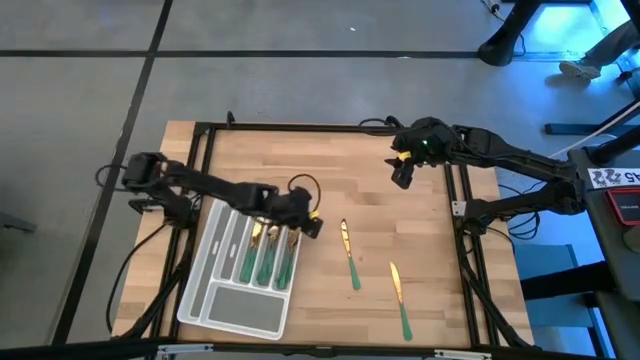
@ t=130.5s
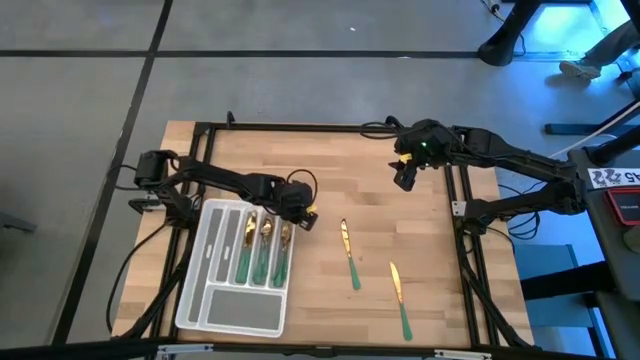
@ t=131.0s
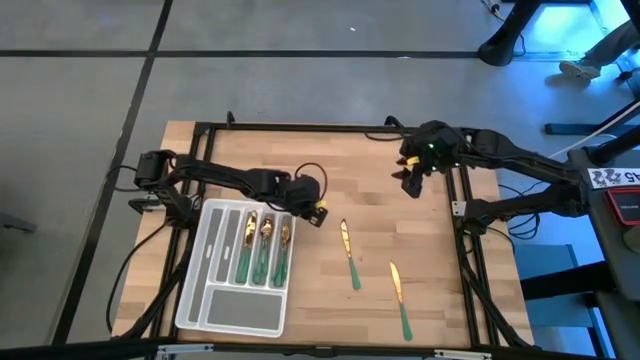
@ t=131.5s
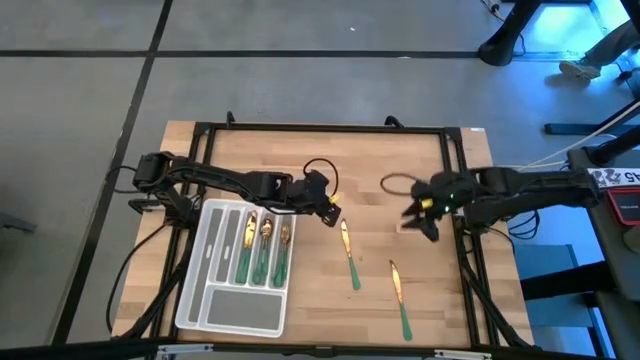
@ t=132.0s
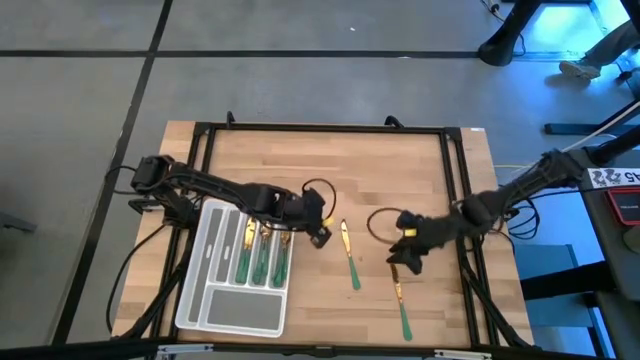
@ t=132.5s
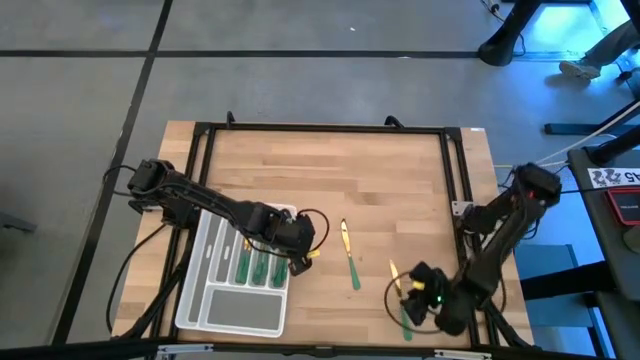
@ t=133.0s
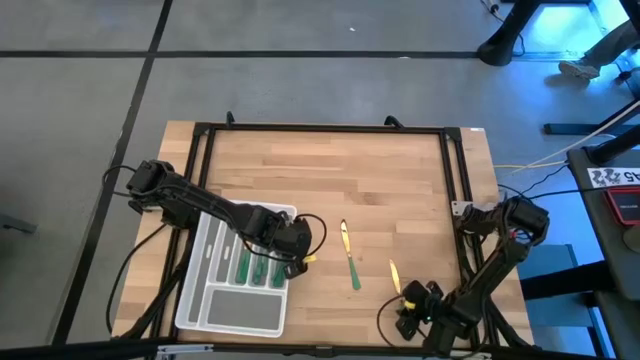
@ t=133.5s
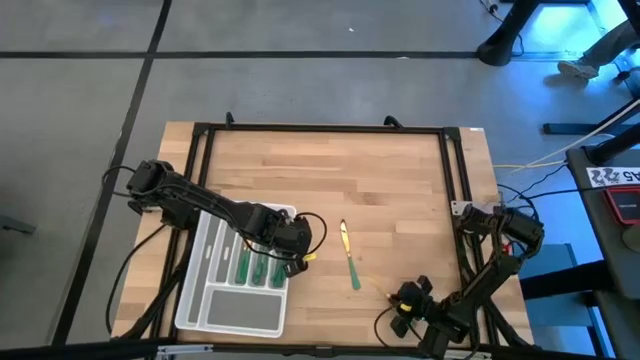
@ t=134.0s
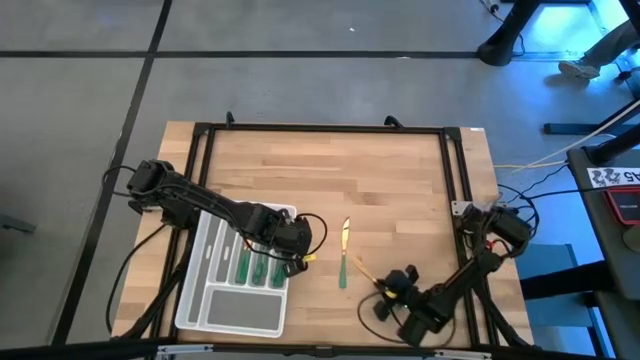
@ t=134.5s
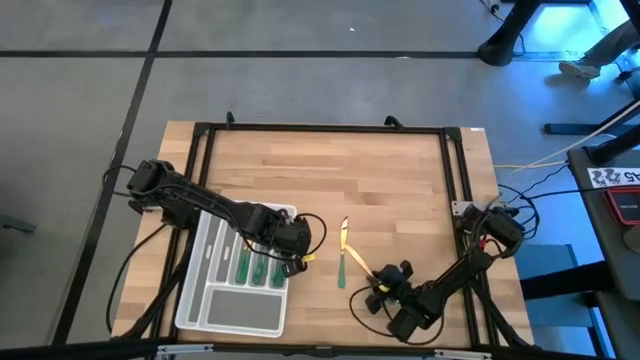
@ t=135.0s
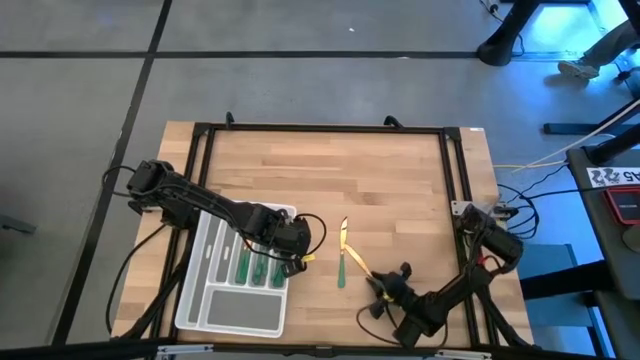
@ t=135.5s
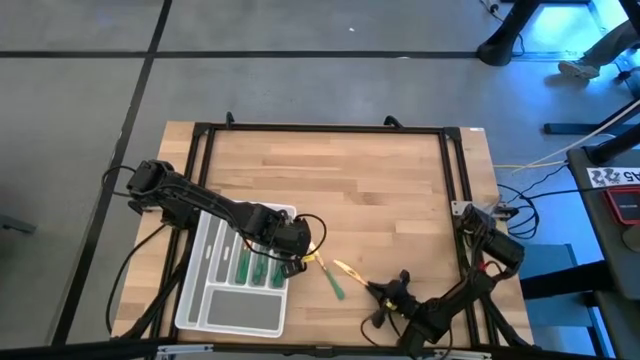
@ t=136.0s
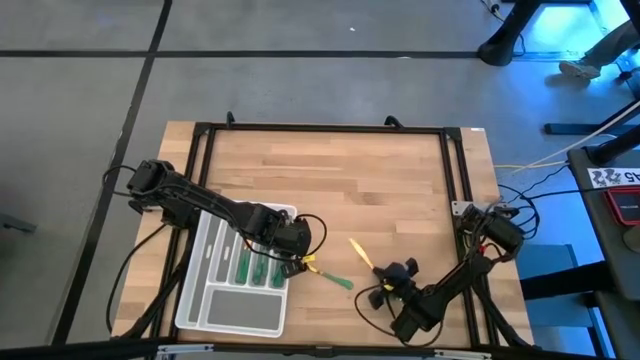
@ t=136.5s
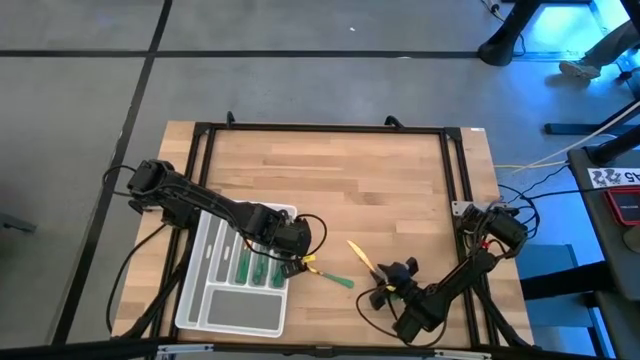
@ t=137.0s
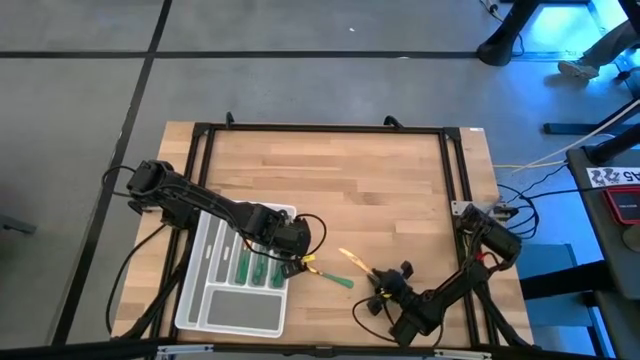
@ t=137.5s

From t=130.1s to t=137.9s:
Task: Sort silverware
Put the knife into the silverware tray

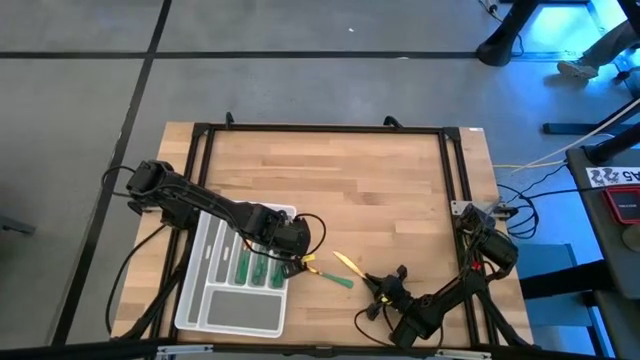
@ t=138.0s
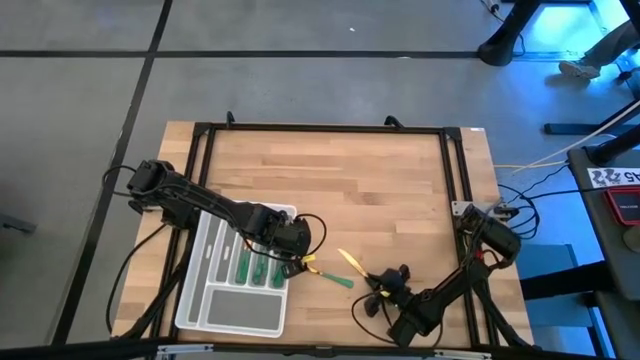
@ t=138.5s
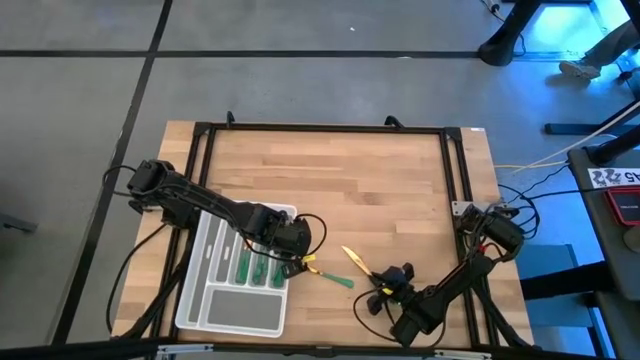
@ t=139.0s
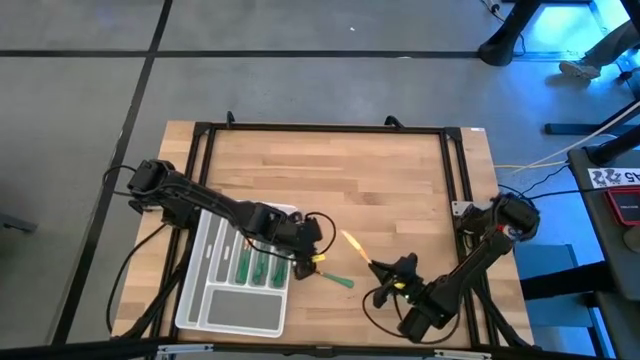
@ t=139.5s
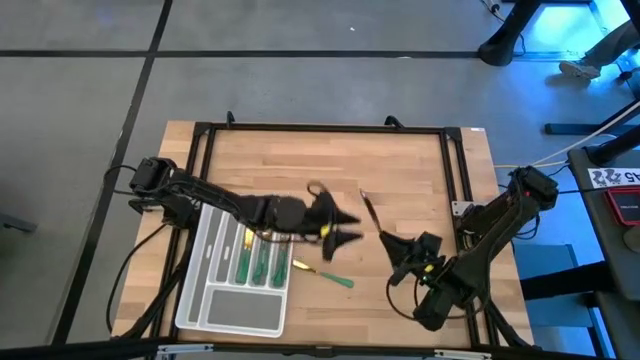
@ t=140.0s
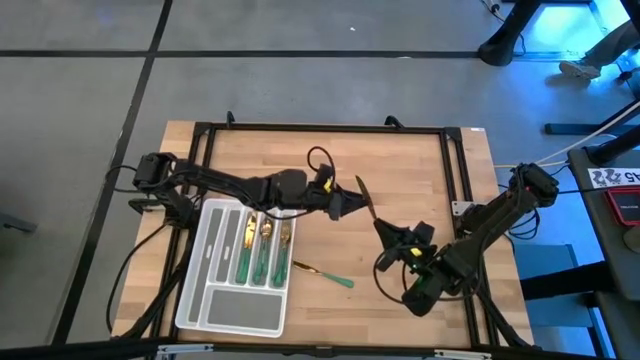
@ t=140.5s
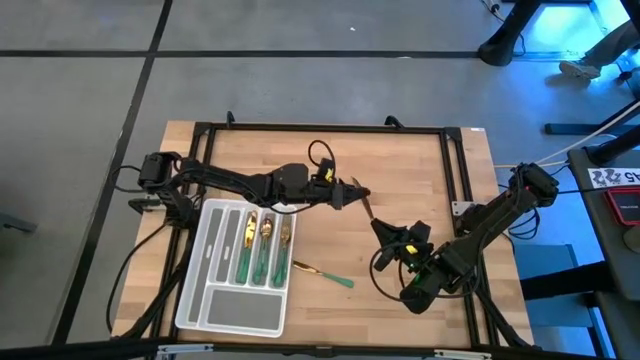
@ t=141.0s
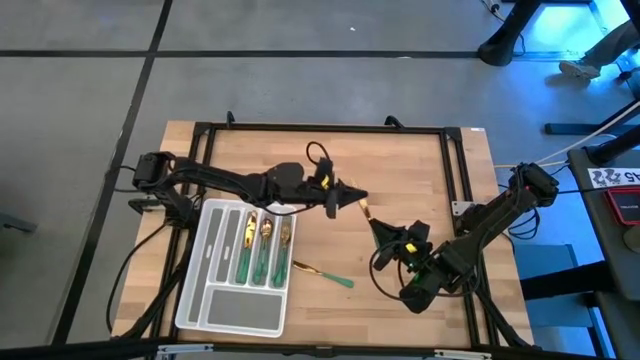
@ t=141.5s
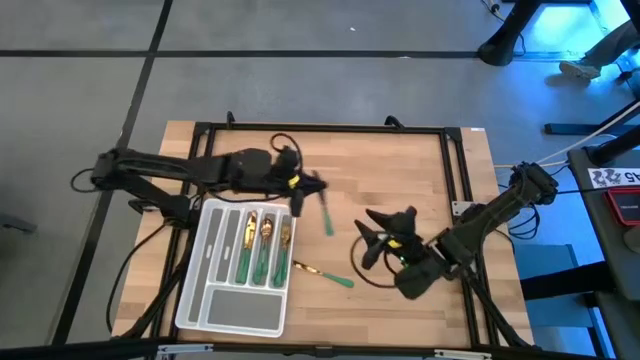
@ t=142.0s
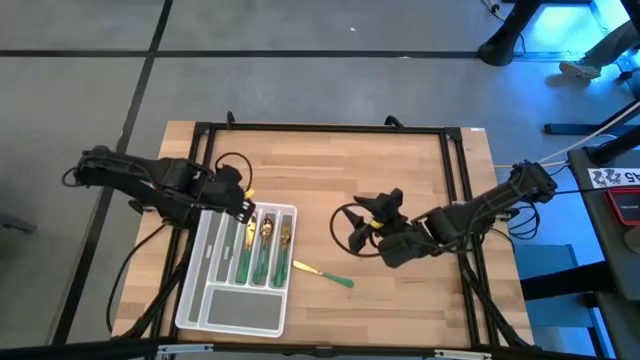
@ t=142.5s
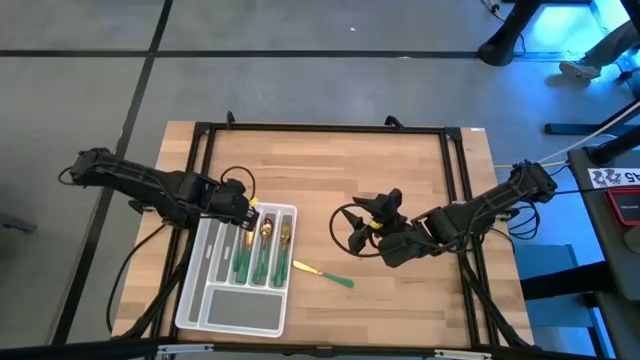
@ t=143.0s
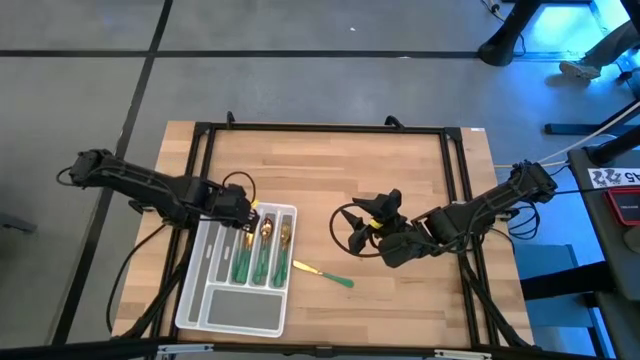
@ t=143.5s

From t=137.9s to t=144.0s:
Put the knife into the silverware tray

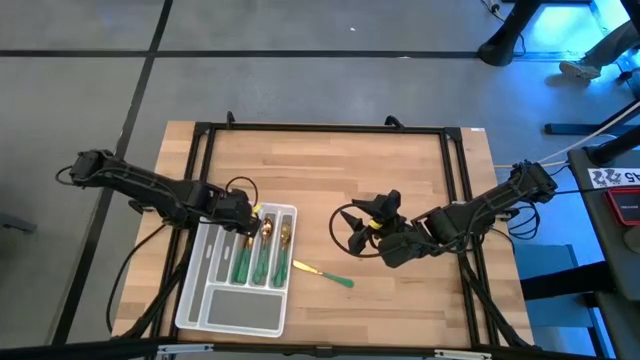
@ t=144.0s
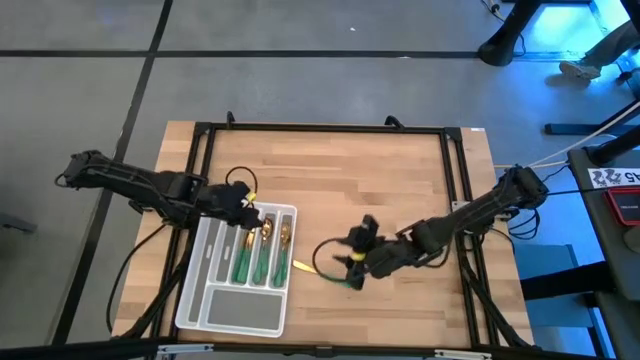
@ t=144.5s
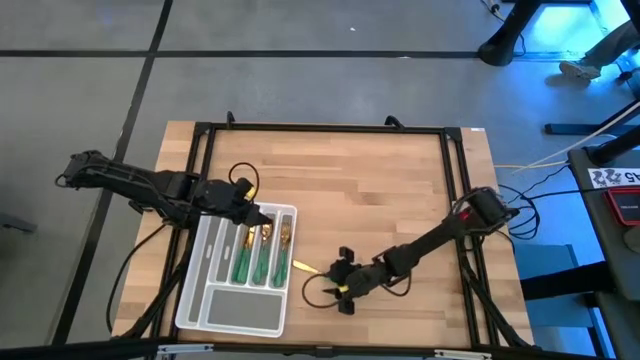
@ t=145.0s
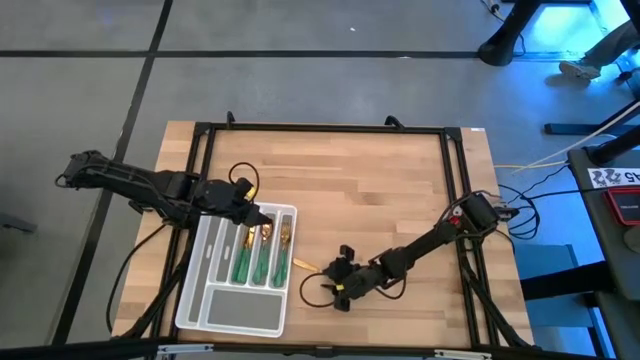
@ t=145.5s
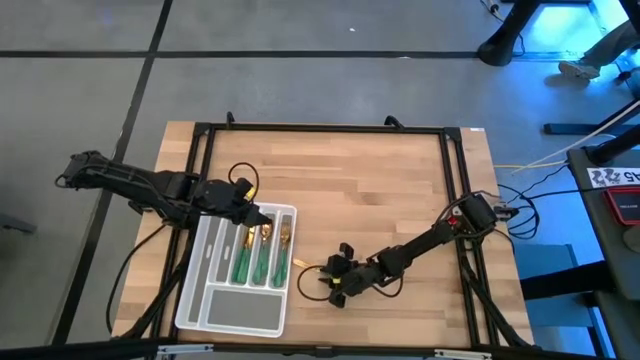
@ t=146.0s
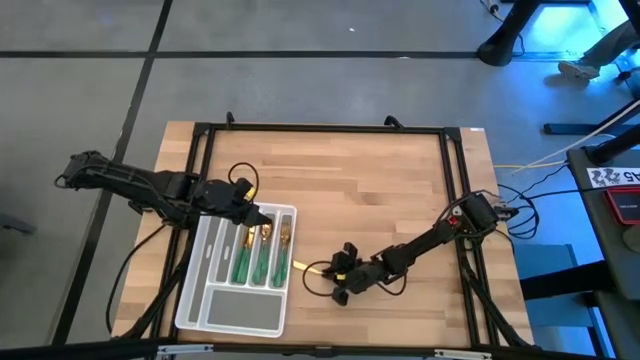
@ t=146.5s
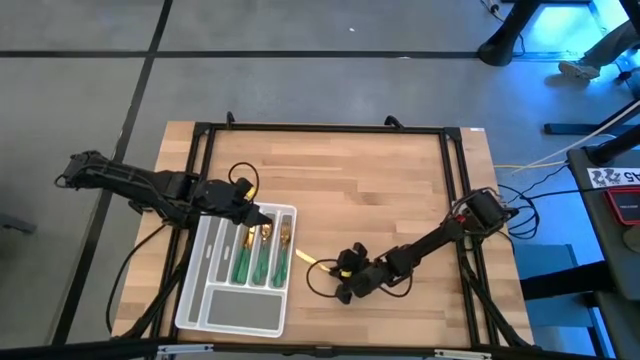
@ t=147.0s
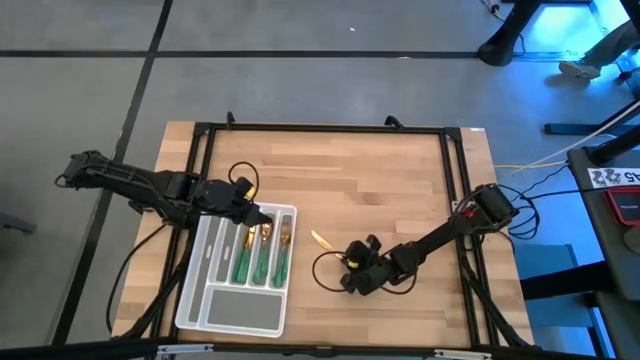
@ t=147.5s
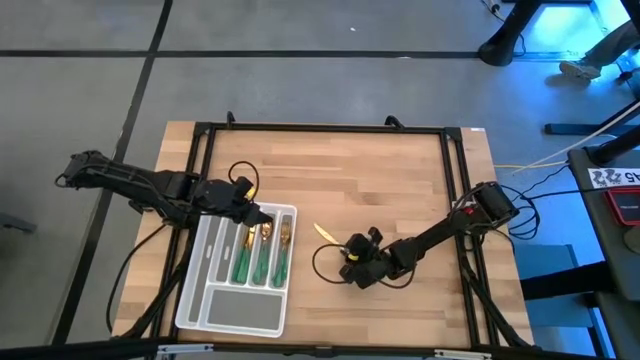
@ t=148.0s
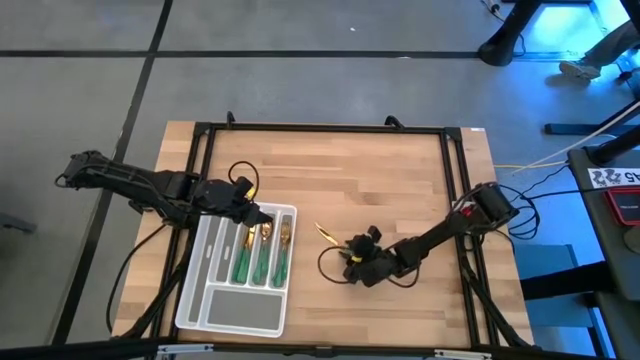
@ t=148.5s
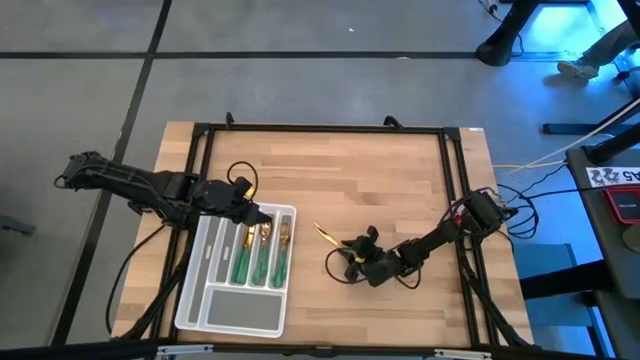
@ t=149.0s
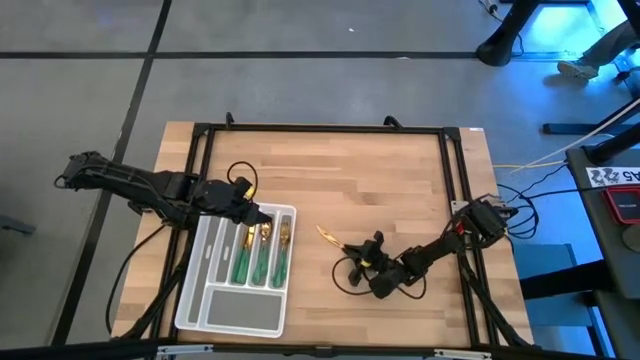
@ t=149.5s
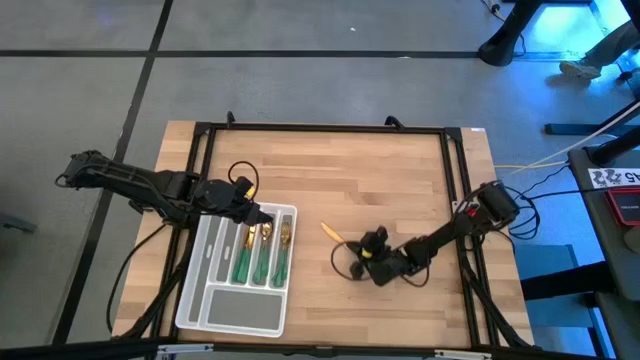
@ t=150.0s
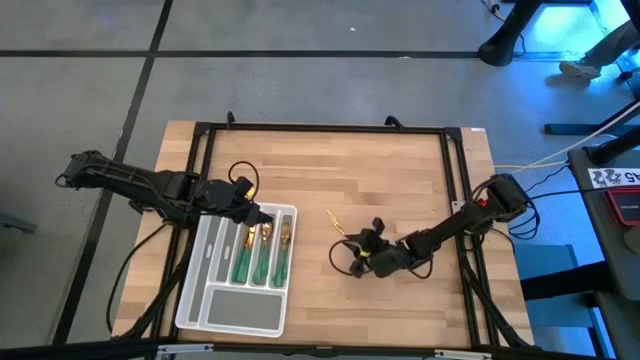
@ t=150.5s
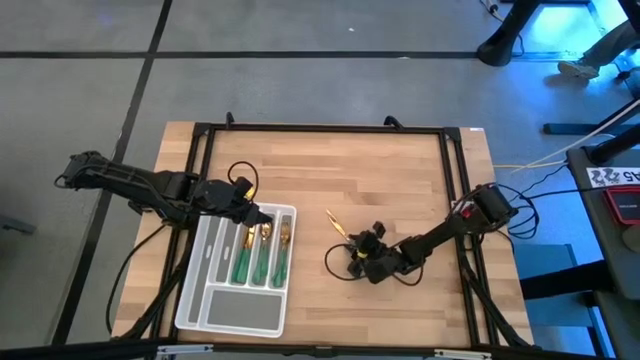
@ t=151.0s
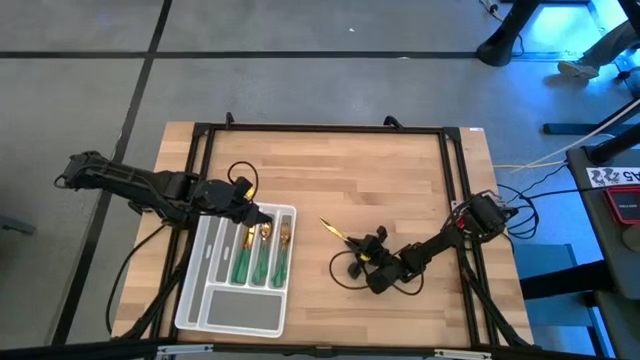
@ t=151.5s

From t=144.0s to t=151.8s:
Put the knife into the silverware tray
